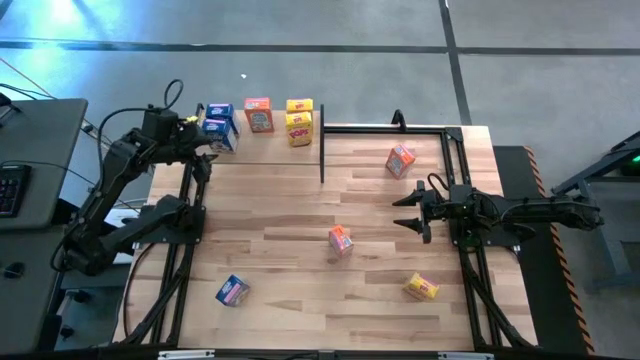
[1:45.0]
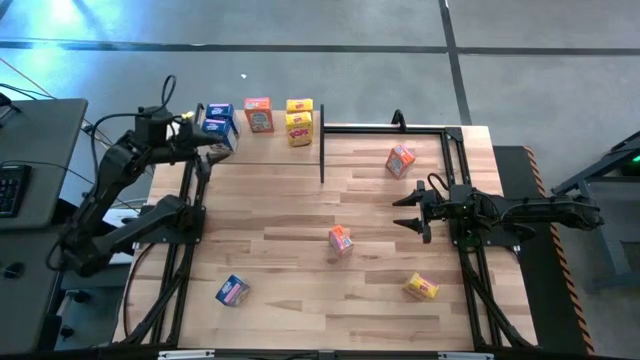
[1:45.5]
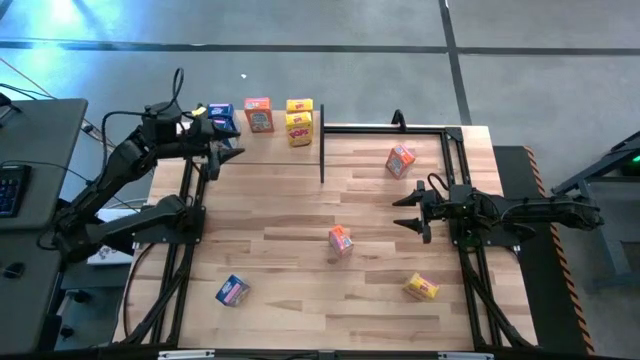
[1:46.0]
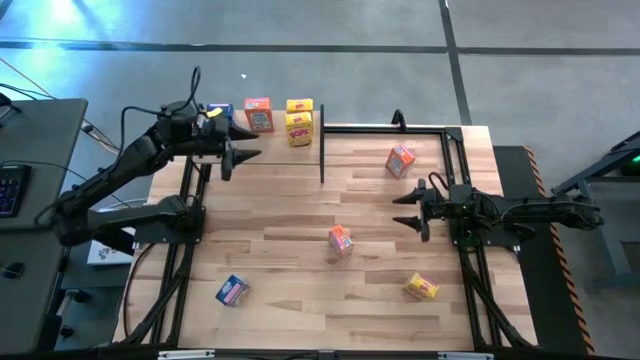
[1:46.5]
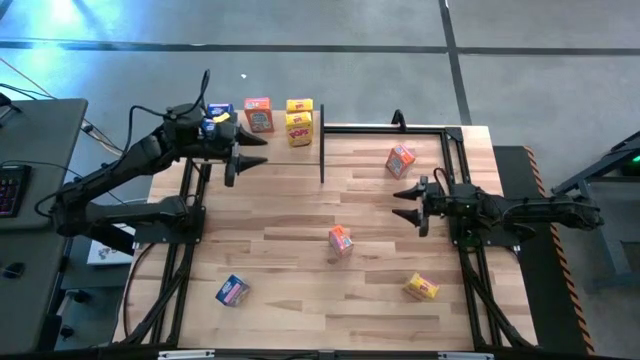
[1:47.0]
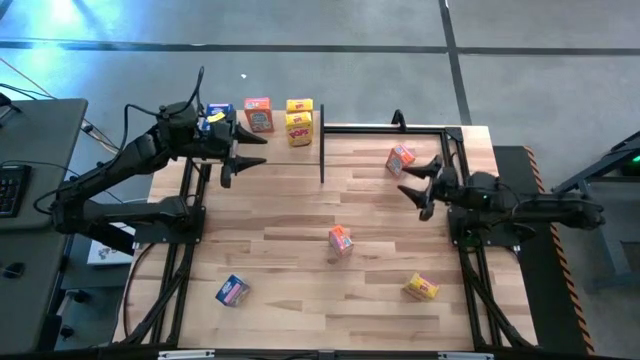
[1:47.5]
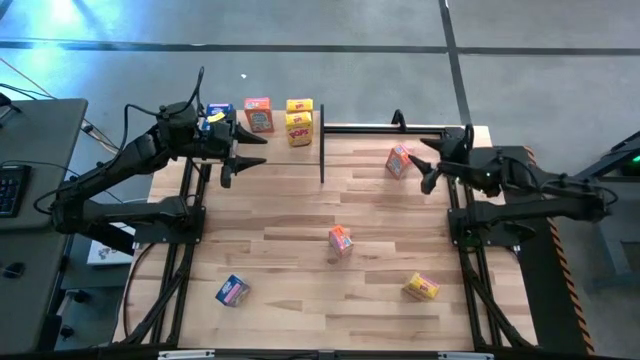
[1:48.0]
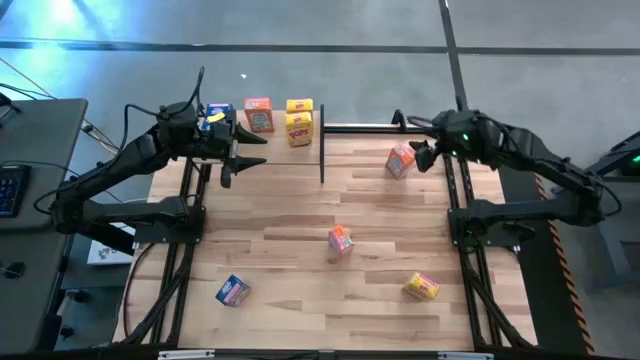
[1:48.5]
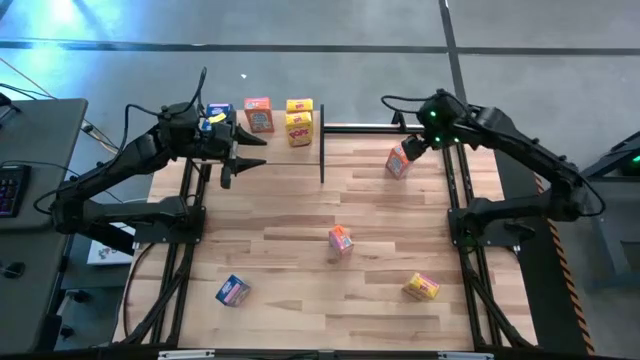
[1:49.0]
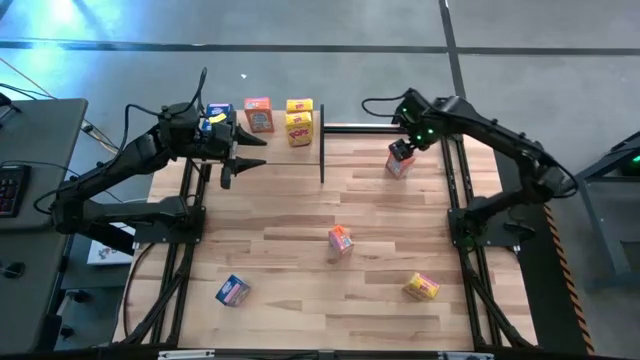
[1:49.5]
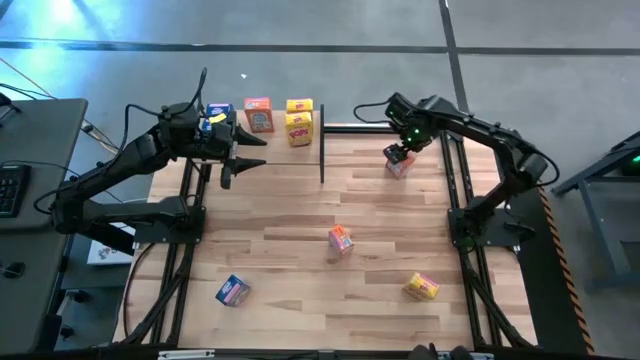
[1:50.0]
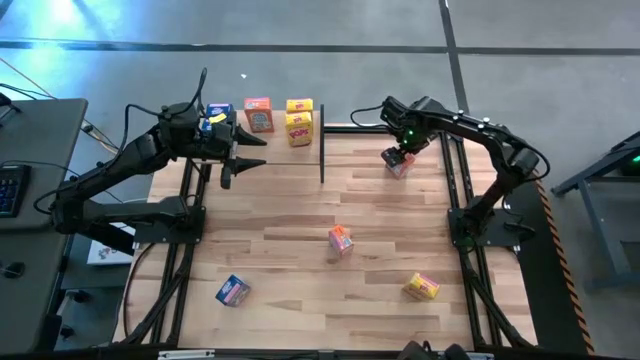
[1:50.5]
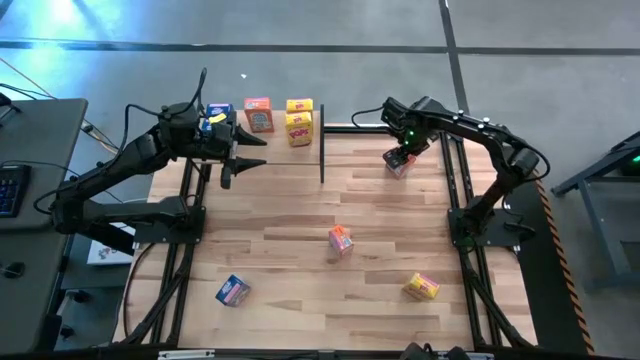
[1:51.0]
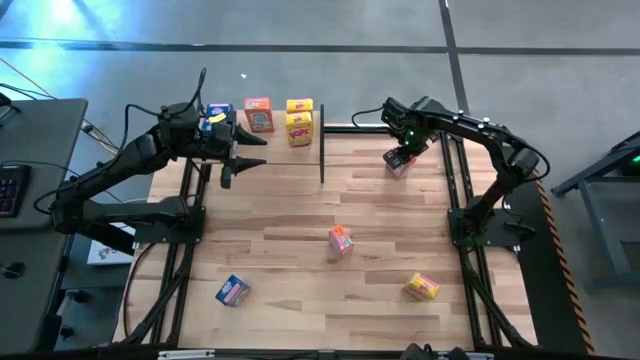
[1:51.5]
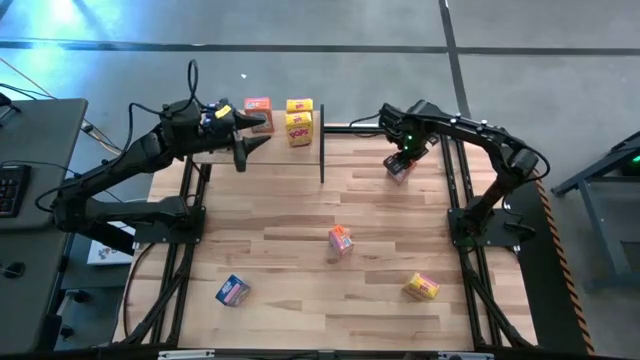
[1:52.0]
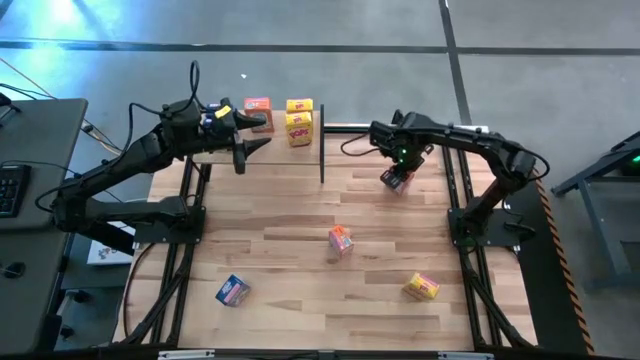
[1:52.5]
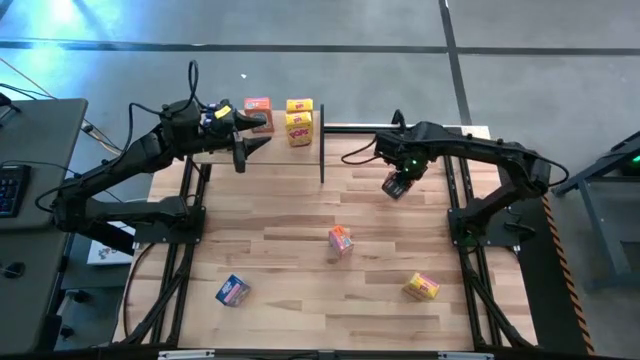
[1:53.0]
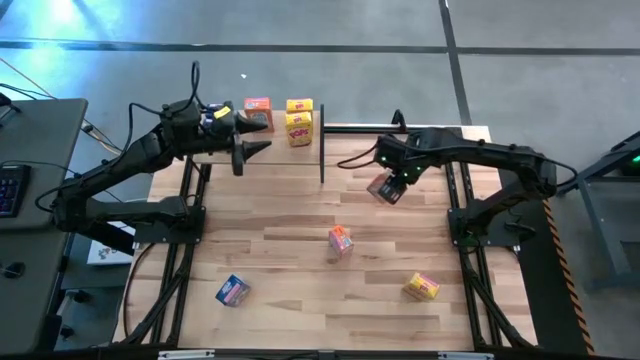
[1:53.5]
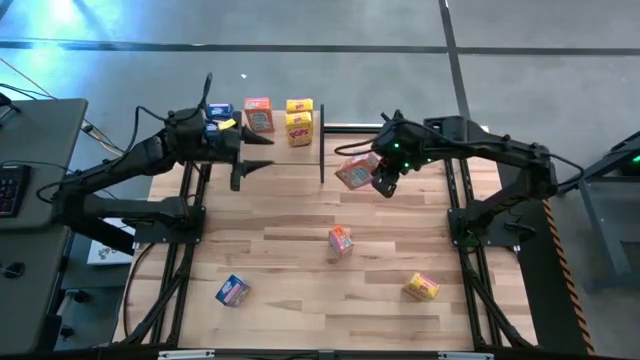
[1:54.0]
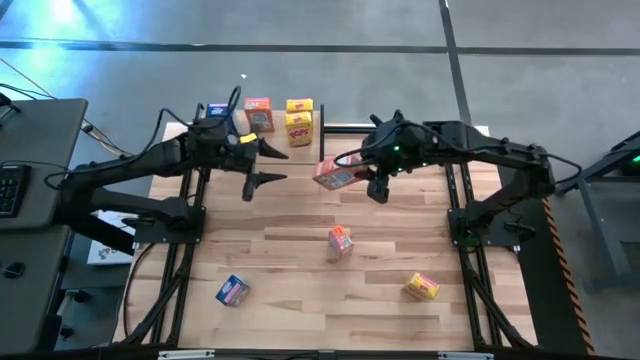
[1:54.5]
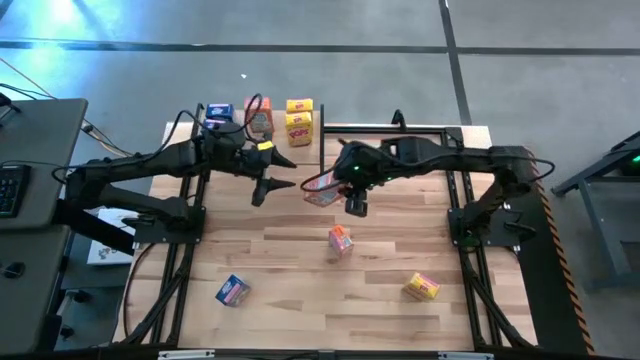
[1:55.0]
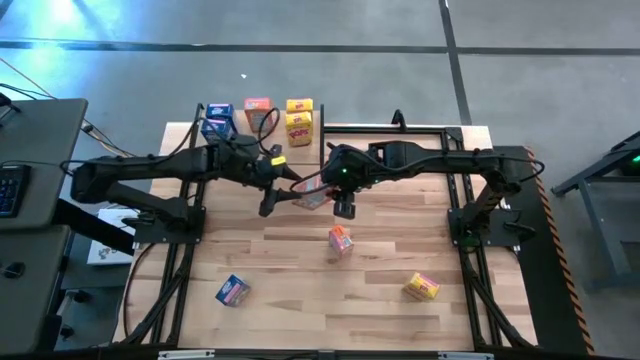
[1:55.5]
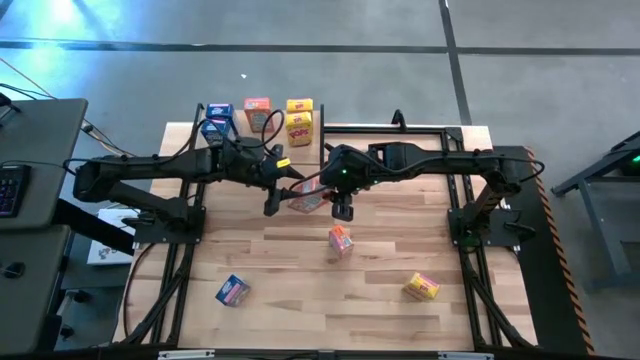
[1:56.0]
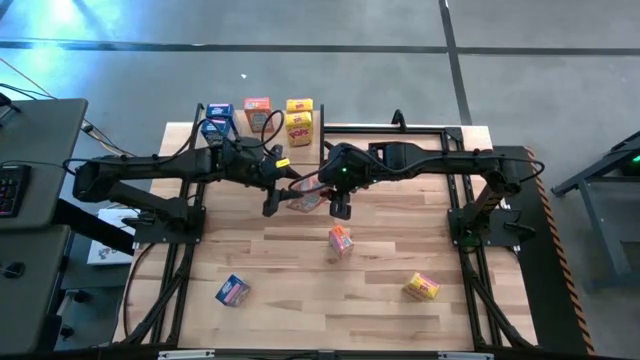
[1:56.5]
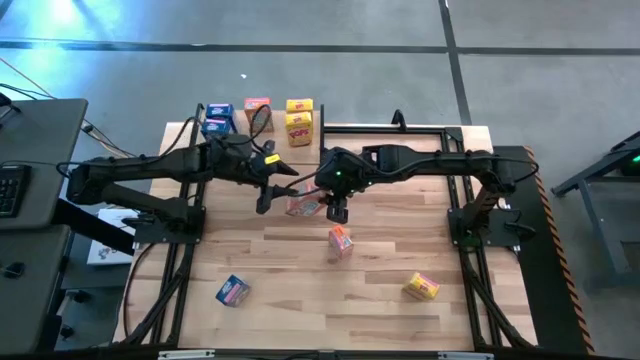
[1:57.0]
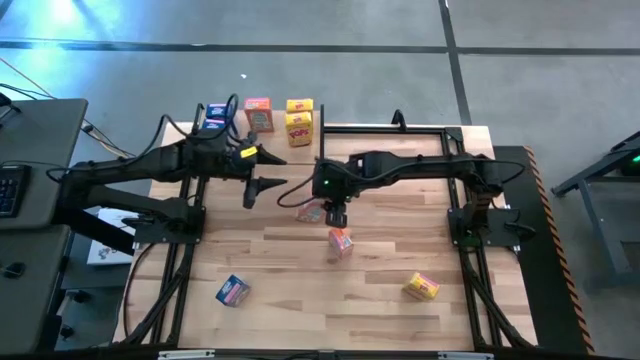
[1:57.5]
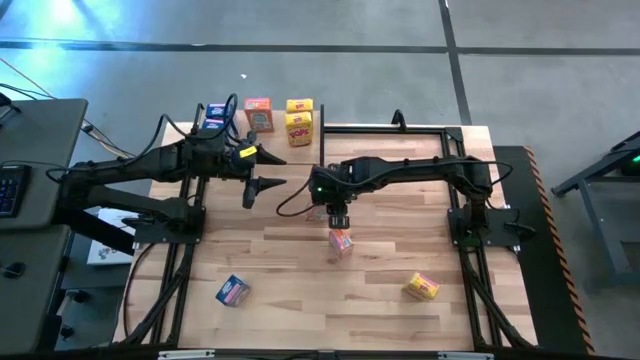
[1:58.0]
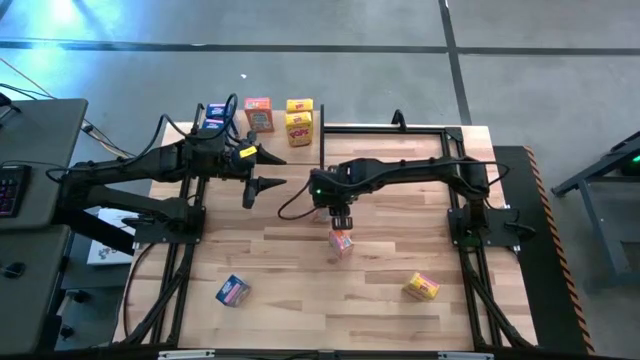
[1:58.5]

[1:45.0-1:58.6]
Task: Stack cereal on shelf
Put the top orange cereal box on the shelf aligned with the other orange cereal box

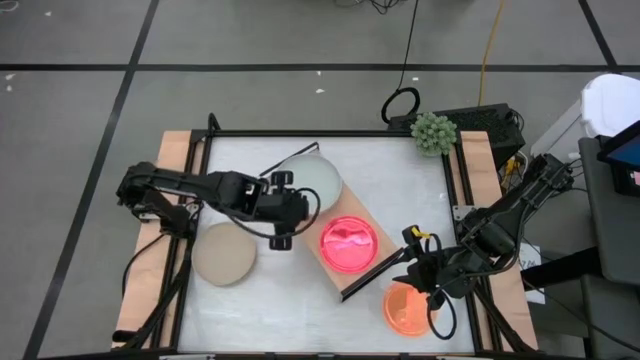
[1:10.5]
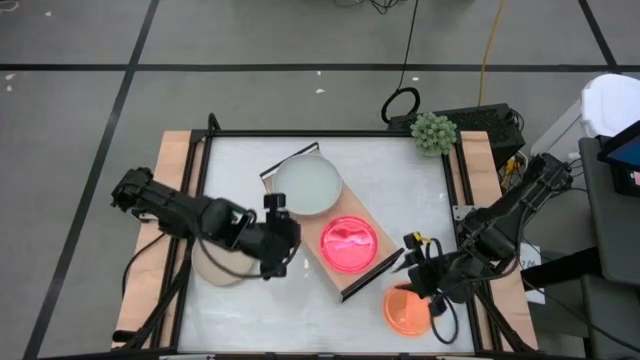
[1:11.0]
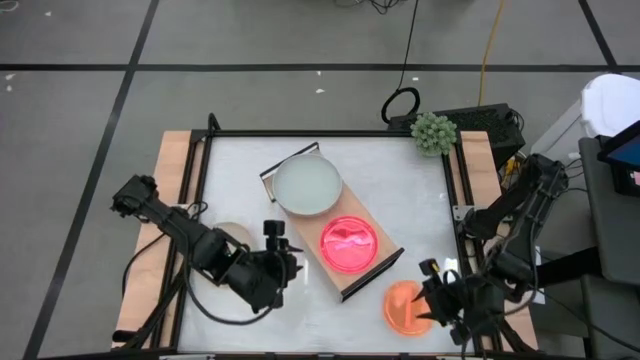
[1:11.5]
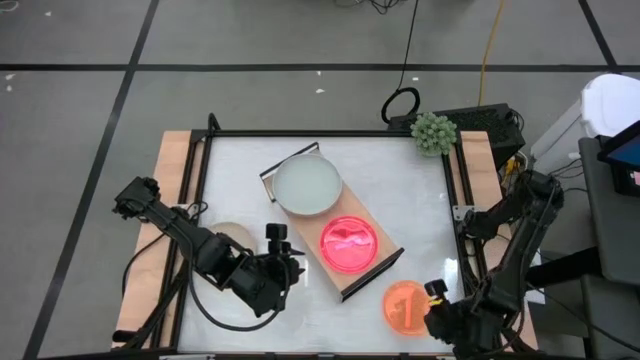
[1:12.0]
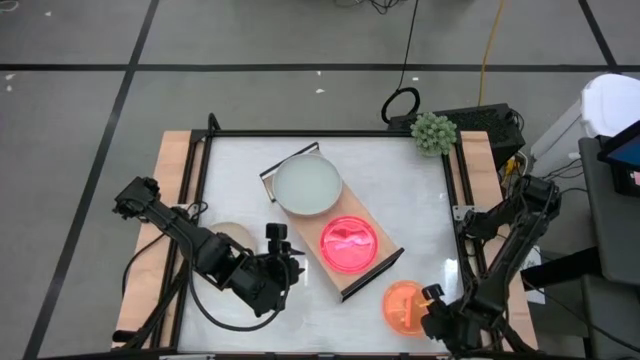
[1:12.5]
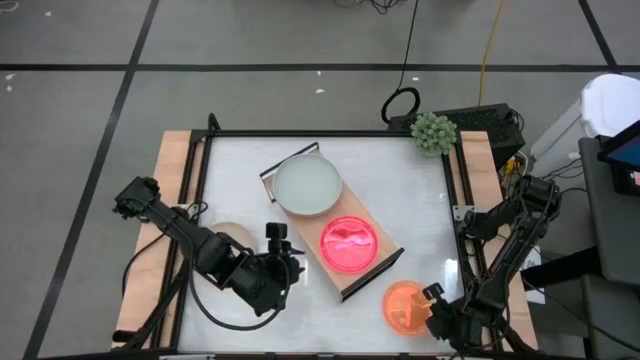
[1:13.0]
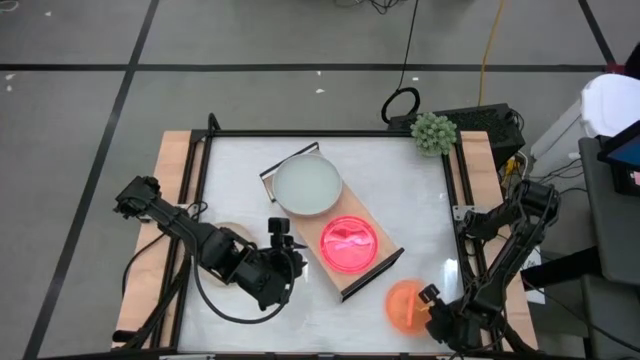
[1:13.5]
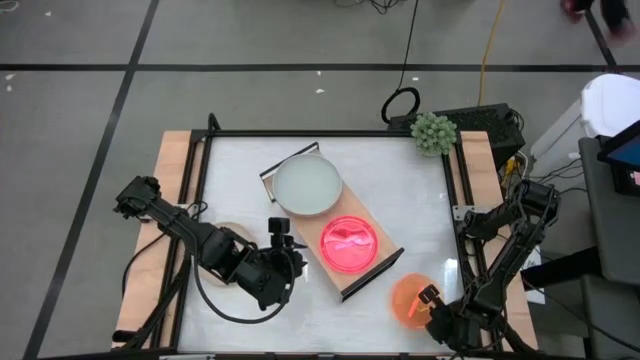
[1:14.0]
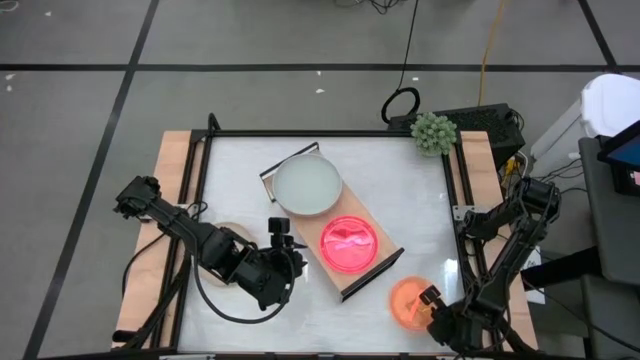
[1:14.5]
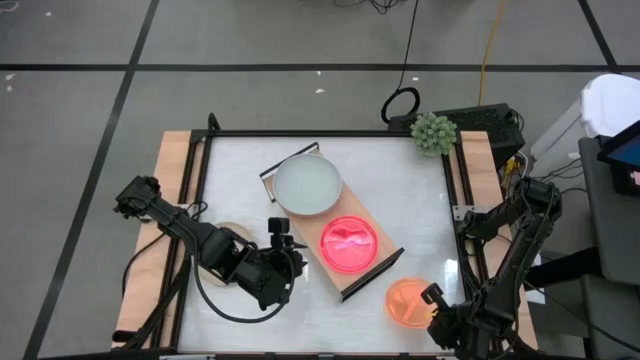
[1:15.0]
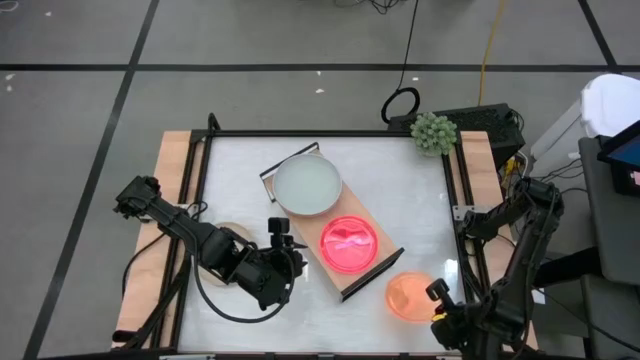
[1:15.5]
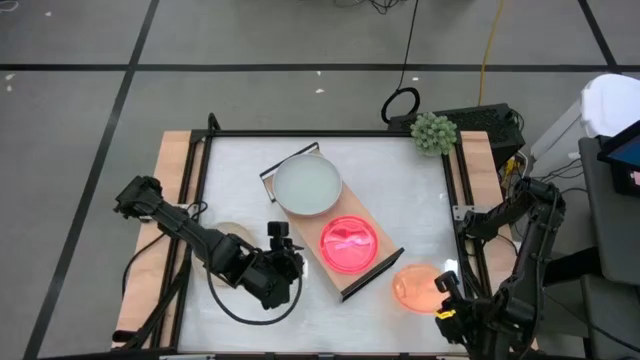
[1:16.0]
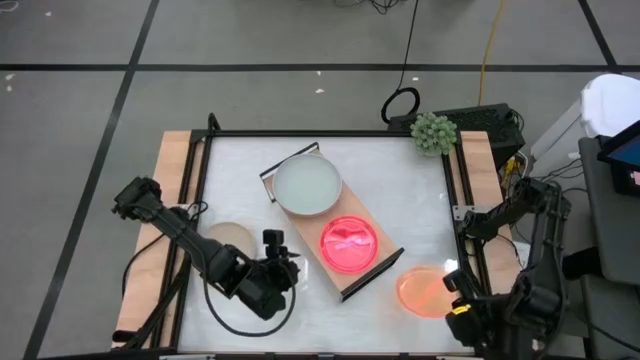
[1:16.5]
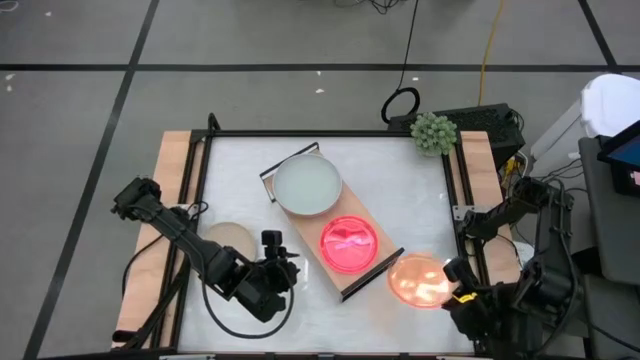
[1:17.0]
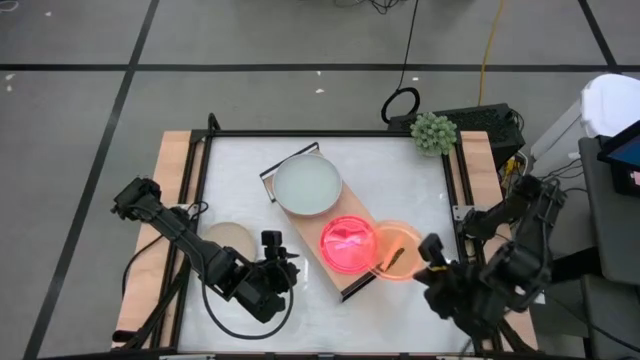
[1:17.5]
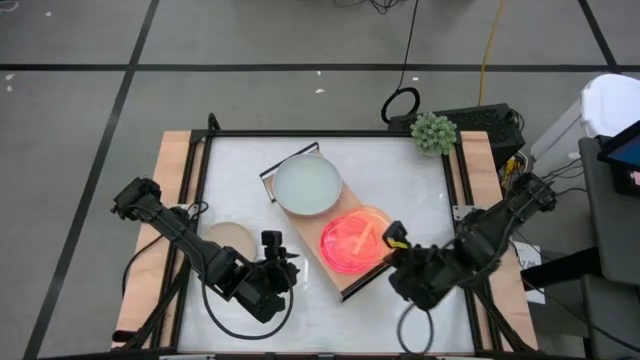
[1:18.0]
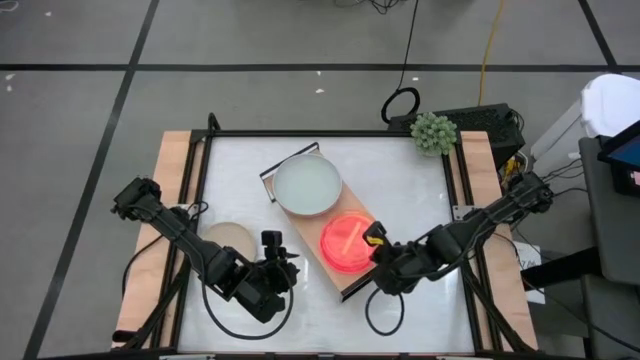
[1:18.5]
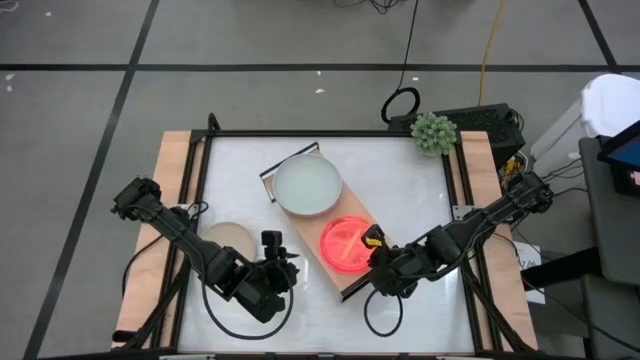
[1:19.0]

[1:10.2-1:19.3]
Task: Place and stack plates onto a shelf
Stack the small orange plate on top of the small pink plate on the shelf
